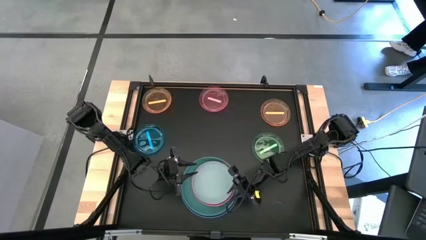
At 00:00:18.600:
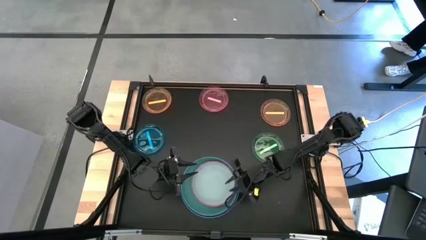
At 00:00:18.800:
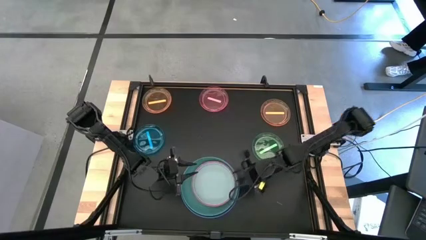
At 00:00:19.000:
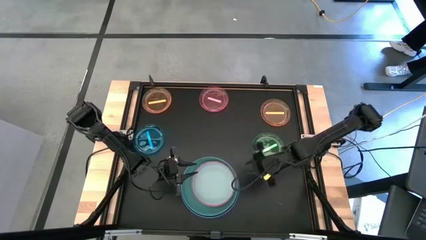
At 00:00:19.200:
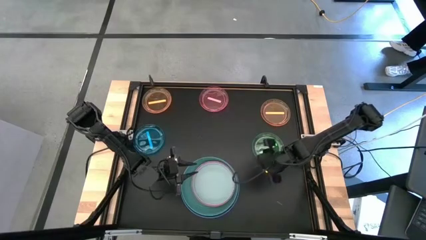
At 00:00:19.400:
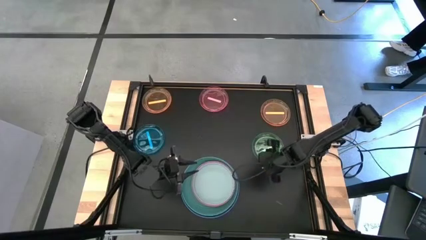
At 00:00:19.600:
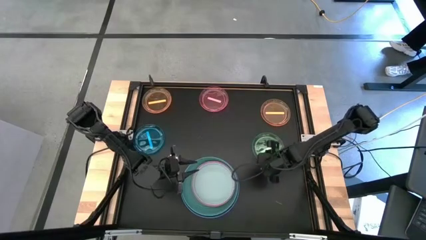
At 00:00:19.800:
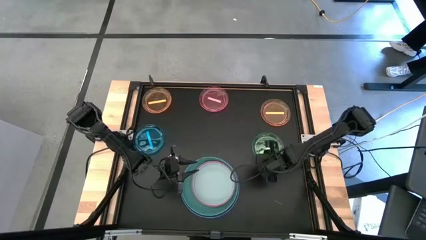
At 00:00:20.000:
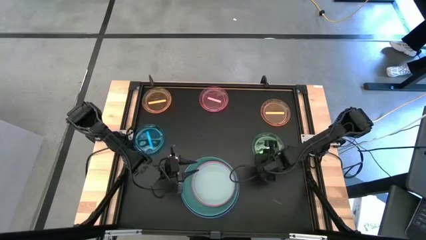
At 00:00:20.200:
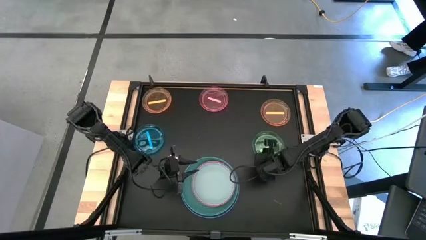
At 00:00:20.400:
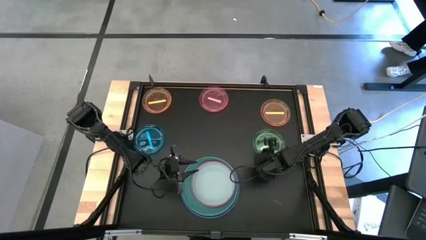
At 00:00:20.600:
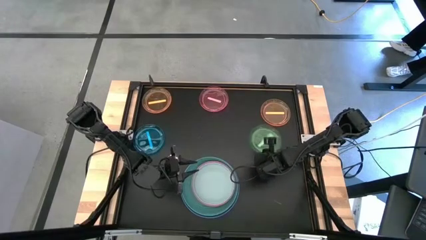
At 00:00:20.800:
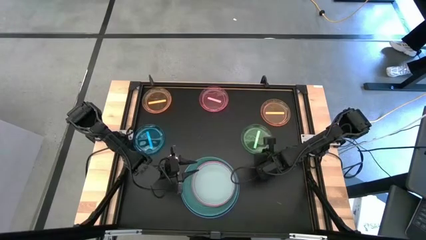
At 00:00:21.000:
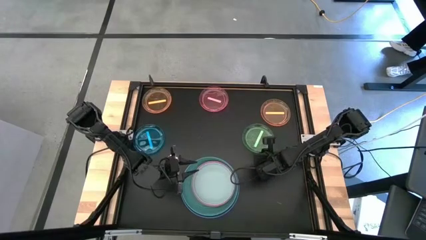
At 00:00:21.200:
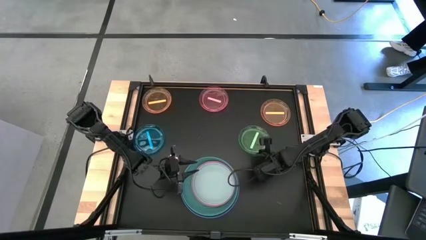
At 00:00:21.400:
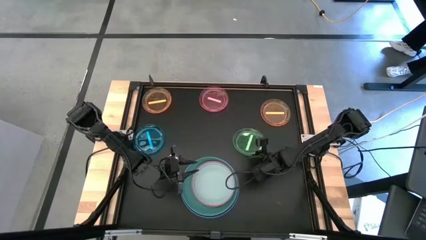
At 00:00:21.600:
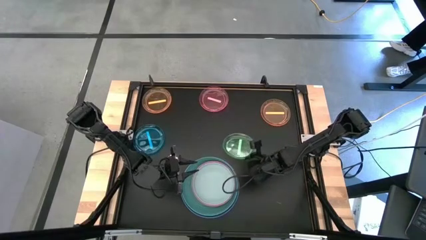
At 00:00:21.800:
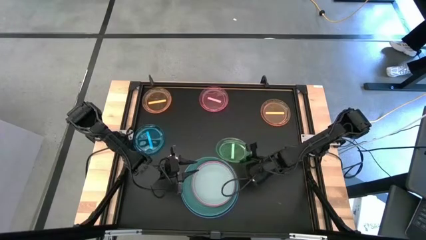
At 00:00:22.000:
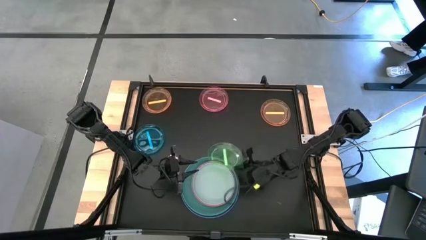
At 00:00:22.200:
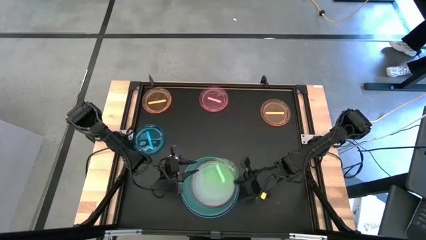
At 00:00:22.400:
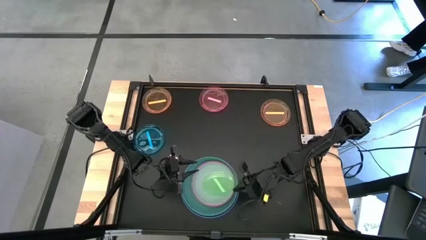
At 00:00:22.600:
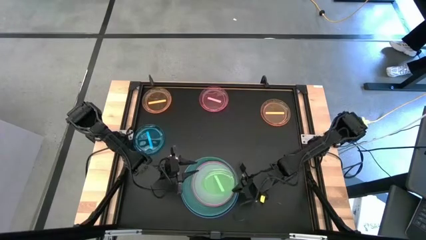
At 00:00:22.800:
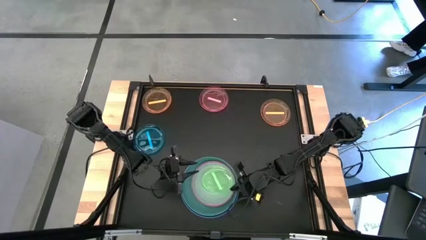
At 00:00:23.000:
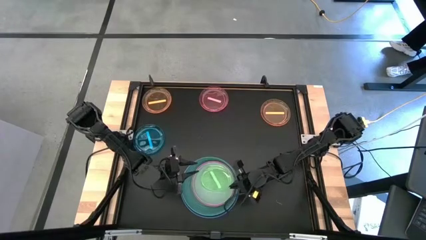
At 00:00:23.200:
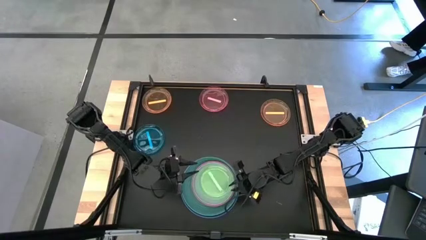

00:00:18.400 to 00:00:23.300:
Task: Stack plastic plates
Stack the light green plate on top of the large light blue plate

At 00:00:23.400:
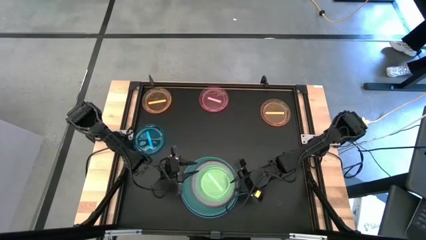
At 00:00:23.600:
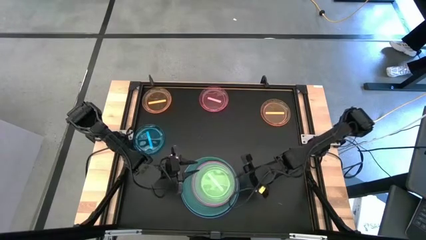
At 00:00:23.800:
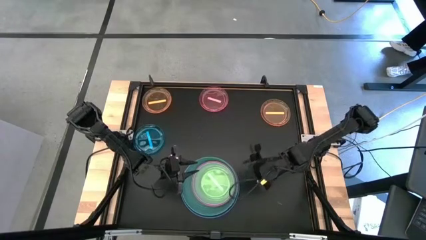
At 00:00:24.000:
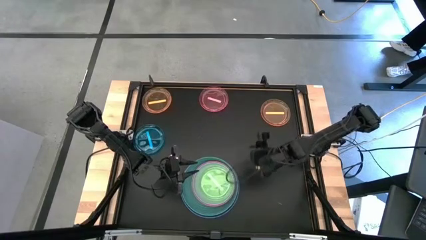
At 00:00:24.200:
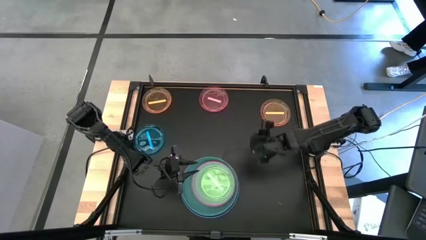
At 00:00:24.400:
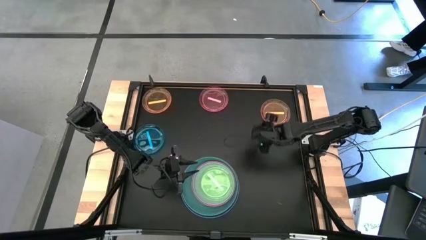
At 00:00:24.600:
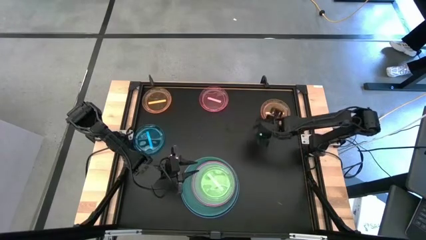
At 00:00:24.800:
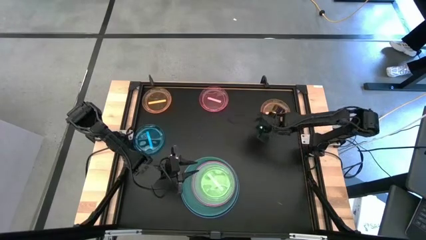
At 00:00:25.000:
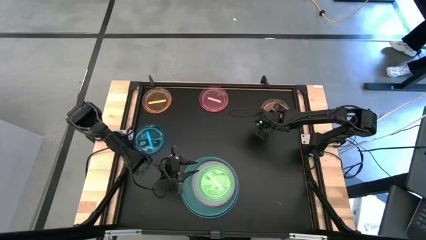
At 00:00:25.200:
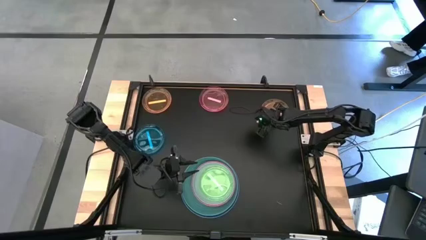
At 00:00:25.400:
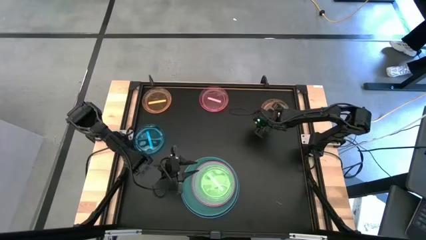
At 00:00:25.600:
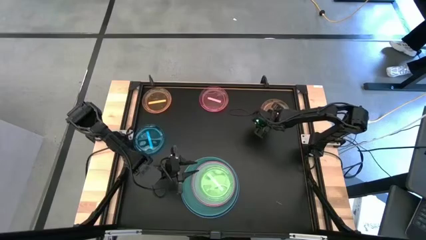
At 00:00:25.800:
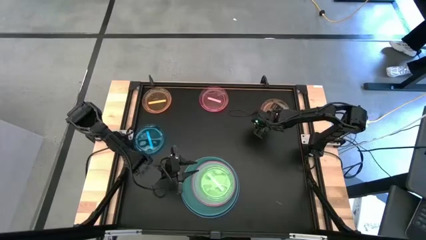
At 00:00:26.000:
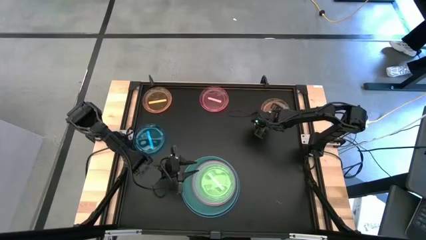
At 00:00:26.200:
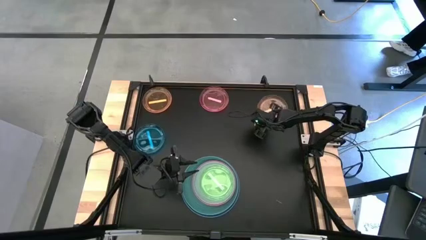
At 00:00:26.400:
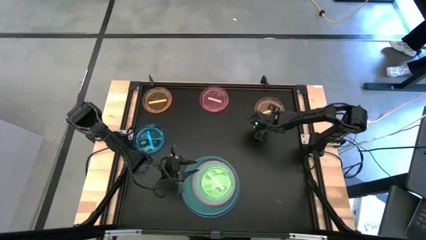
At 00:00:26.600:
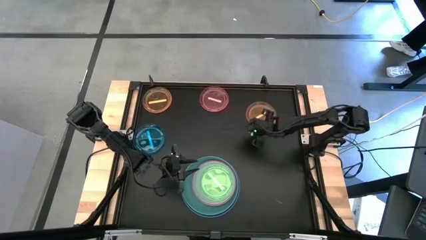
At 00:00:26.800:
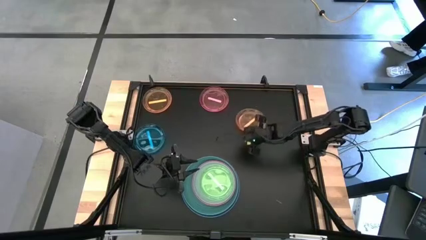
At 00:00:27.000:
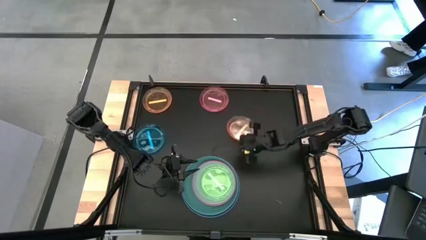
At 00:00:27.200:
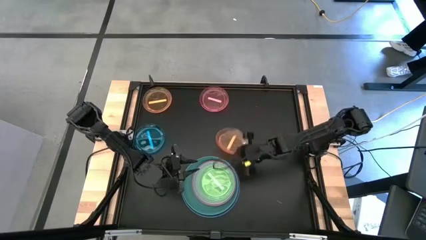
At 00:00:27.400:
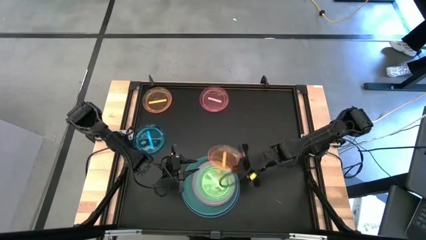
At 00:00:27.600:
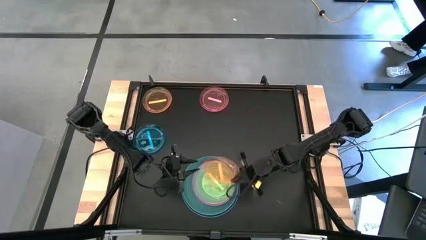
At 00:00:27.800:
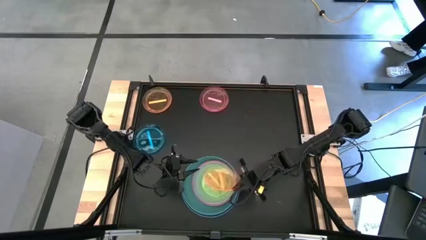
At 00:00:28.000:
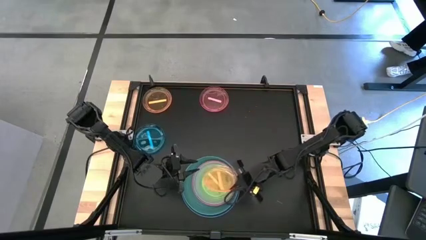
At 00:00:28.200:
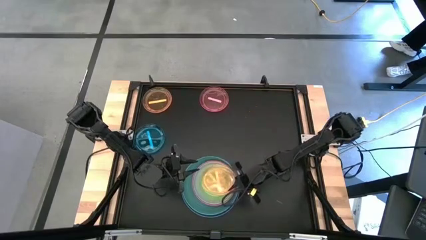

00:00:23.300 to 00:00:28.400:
Stack the right orange plate on top of the light green plate

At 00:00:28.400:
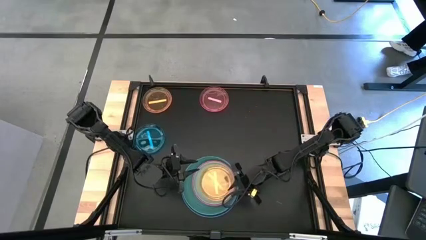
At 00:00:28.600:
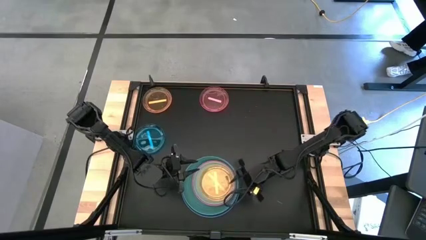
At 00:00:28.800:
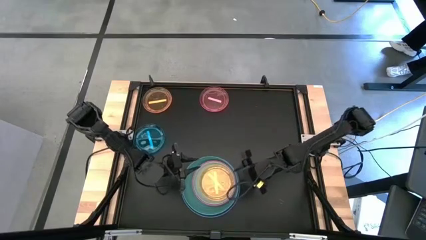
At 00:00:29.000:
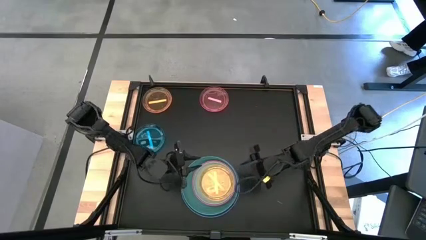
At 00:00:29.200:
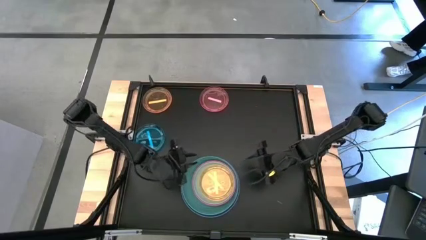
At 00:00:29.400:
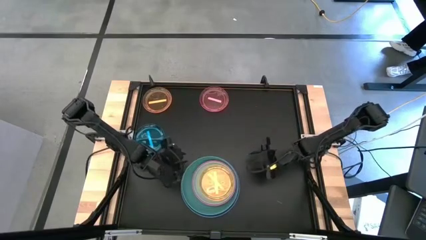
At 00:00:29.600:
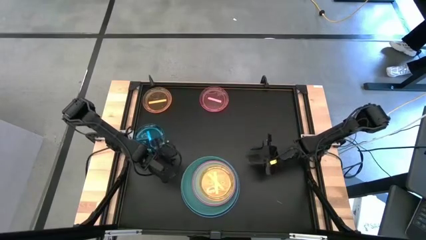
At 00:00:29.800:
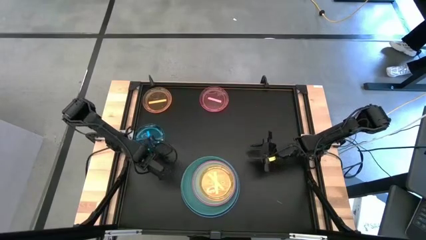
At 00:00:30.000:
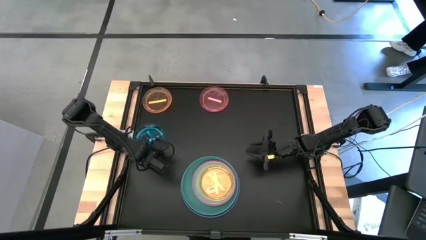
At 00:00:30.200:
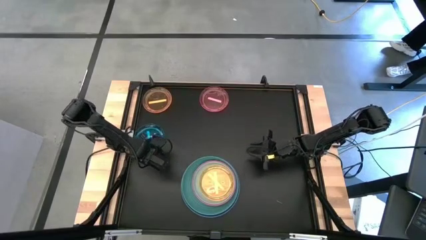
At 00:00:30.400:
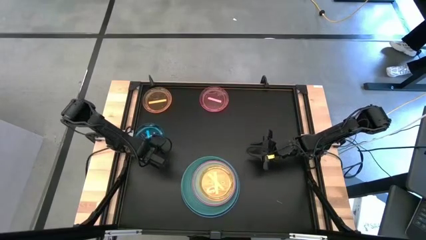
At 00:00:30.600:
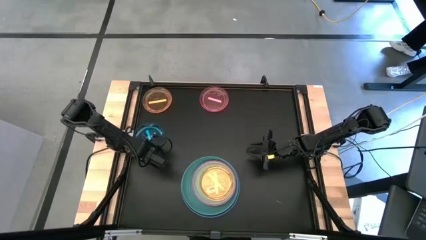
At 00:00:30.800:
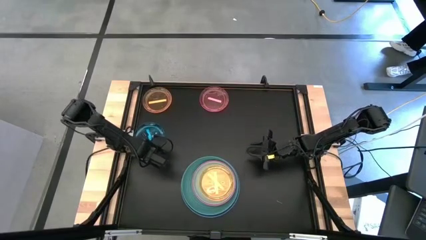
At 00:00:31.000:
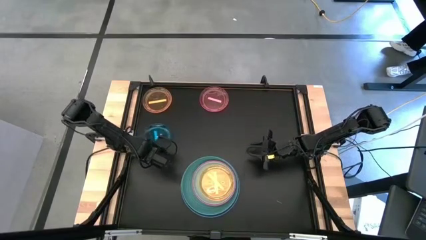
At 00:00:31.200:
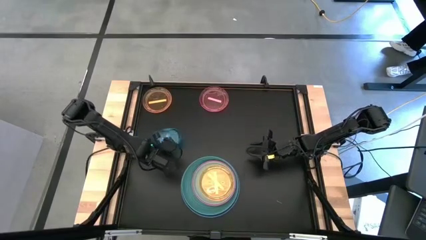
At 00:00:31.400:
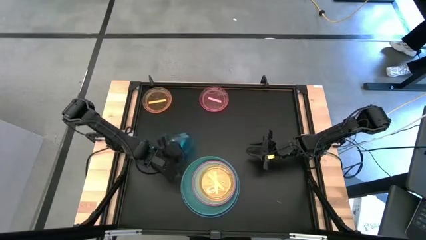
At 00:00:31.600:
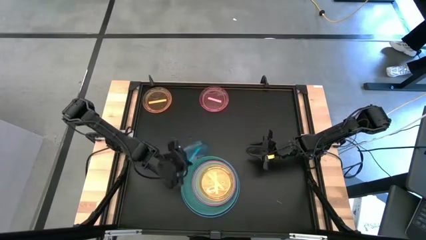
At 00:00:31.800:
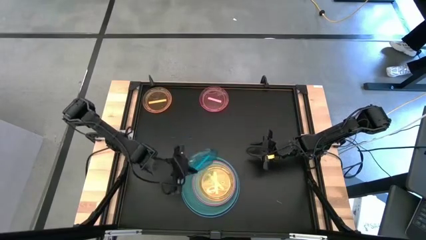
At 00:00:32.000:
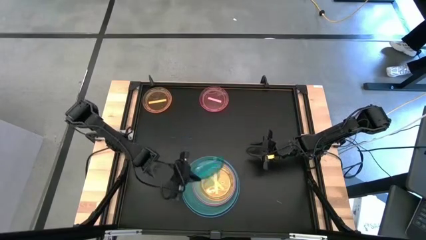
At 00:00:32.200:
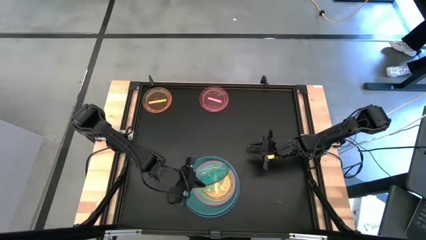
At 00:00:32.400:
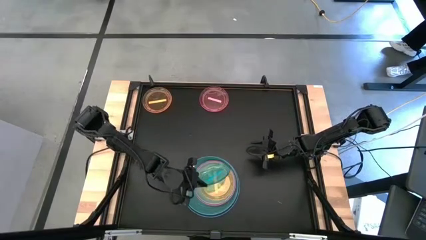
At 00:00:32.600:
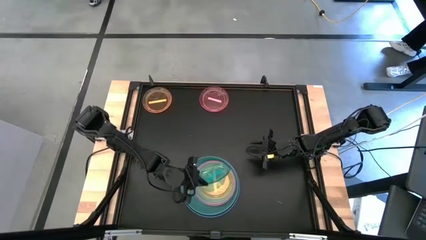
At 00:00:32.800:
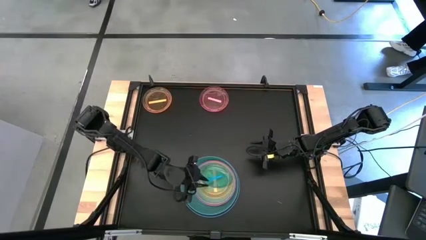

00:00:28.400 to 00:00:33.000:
Stack the small light blue plate on top of the orange plate

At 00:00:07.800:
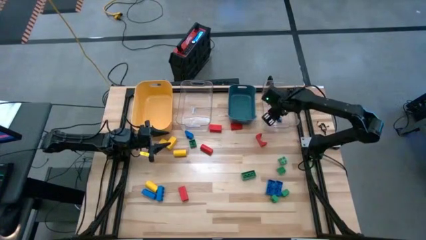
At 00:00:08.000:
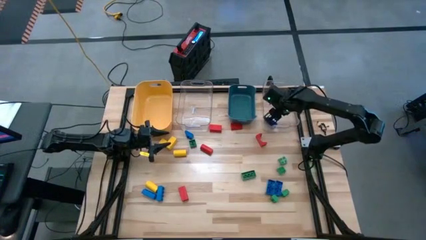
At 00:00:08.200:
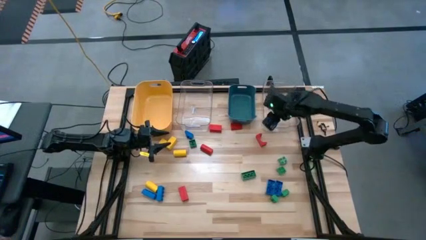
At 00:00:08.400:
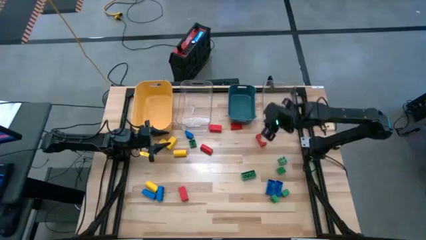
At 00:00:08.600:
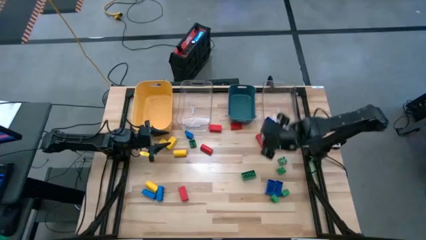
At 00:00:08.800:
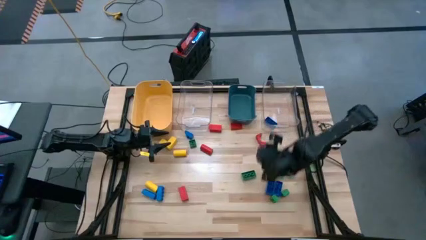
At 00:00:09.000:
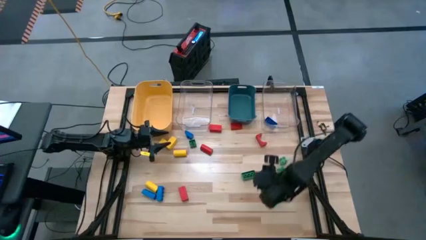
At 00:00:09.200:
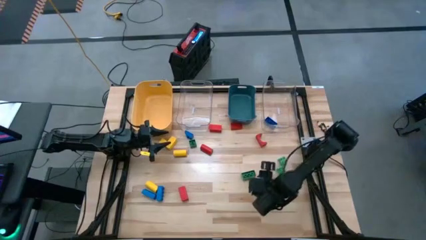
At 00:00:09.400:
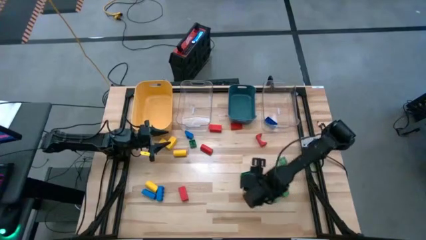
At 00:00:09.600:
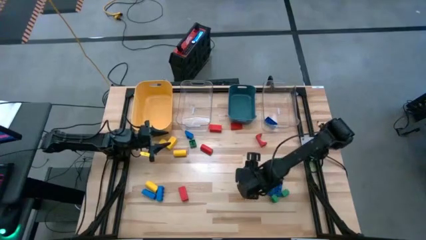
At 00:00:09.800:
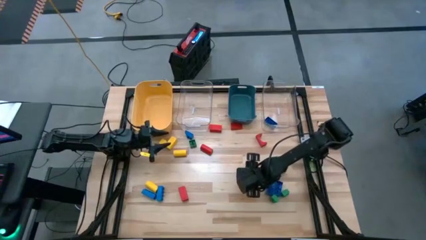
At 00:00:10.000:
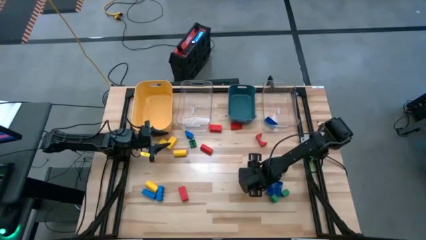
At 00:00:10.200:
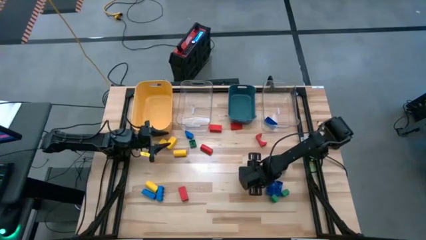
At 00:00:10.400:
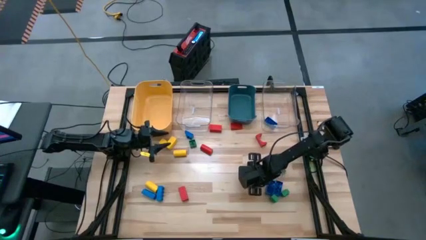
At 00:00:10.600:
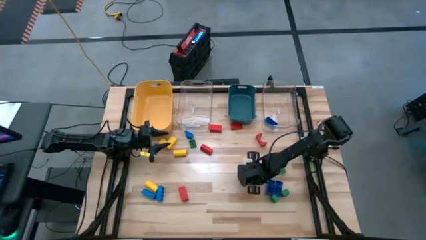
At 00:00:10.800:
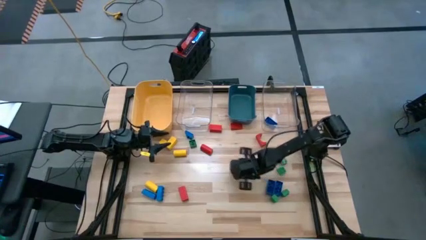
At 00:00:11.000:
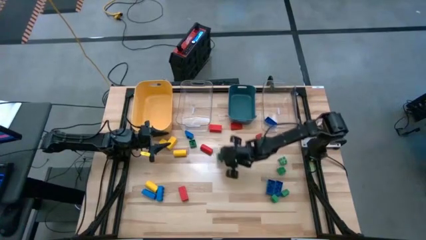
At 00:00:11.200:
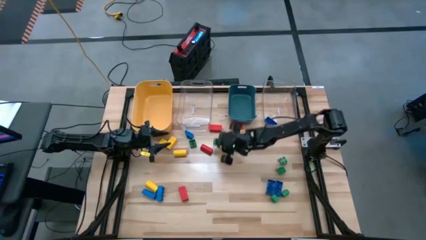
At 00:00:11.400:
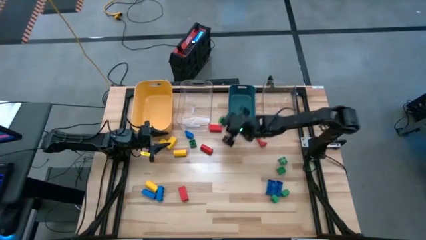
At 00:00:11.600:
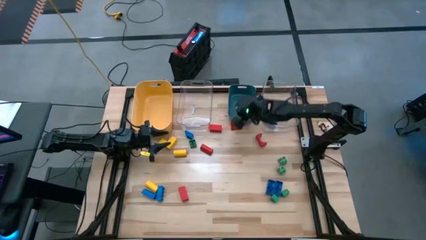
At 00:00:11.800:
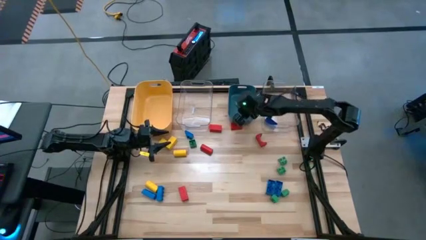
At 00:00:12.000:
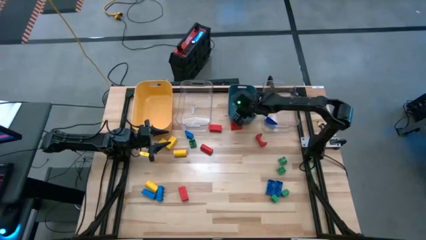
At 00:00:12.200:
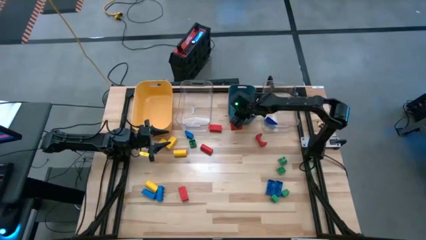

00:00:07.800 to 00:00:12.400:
Task: Sort blocks
Put the green game piece into the blue bin
